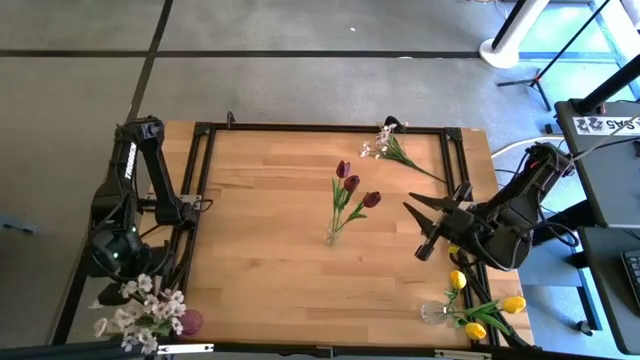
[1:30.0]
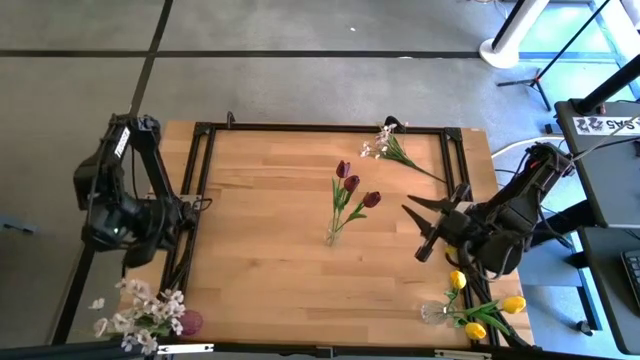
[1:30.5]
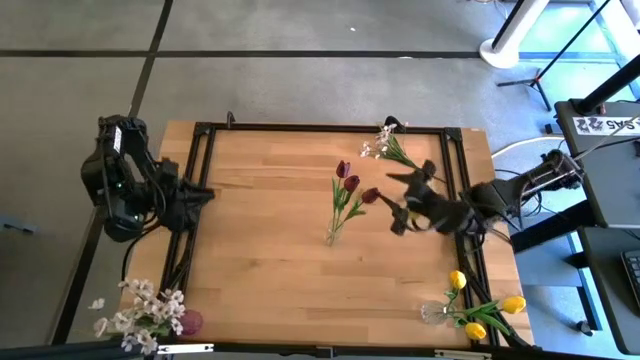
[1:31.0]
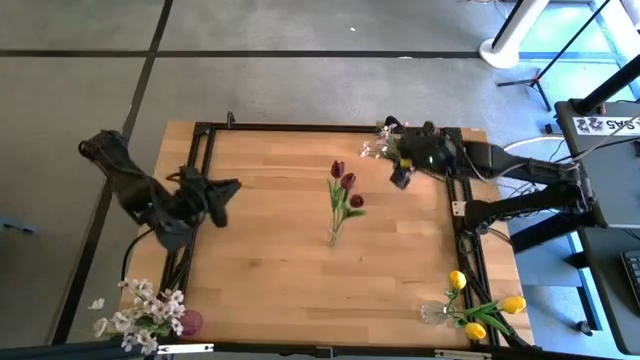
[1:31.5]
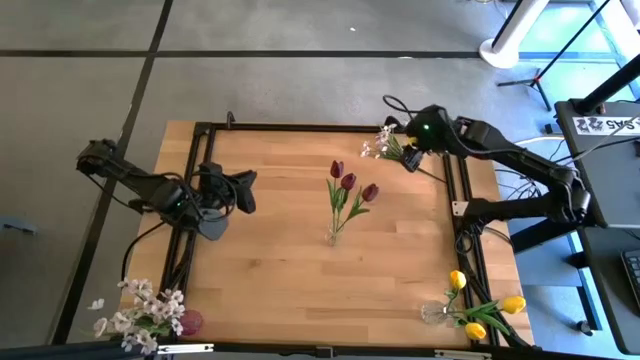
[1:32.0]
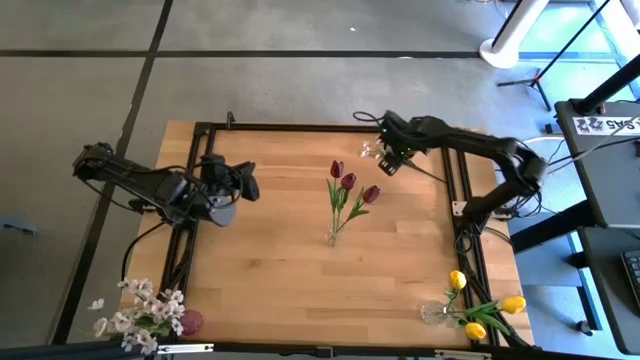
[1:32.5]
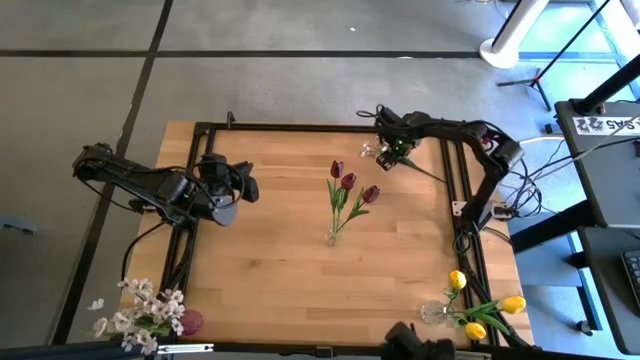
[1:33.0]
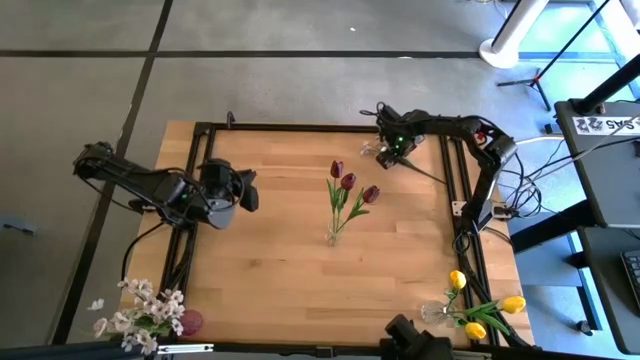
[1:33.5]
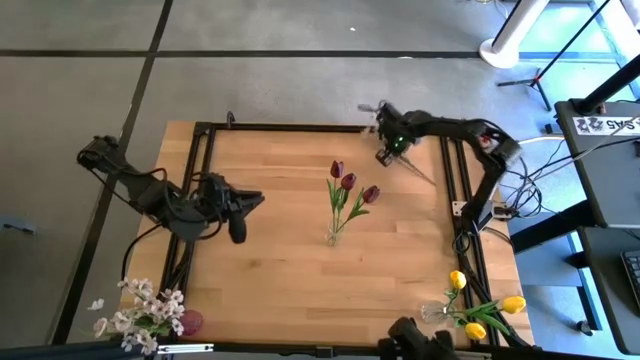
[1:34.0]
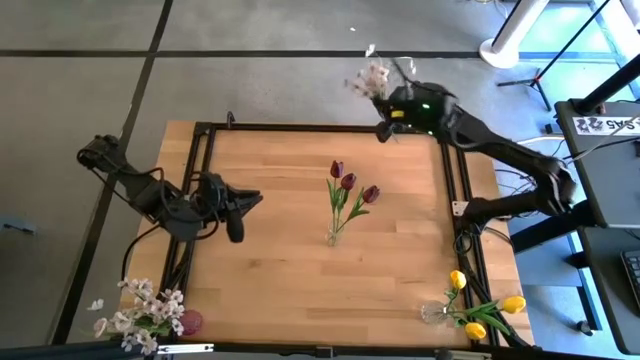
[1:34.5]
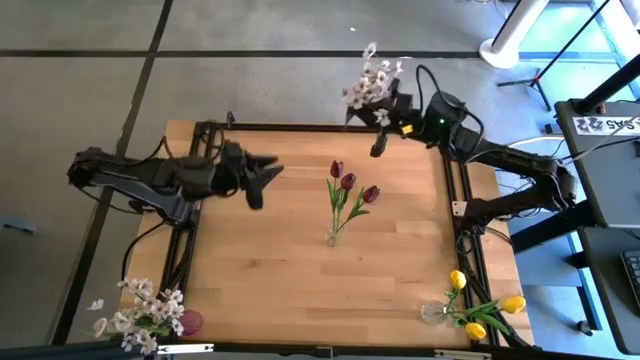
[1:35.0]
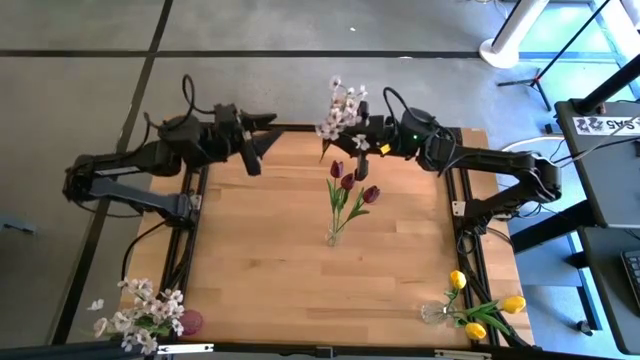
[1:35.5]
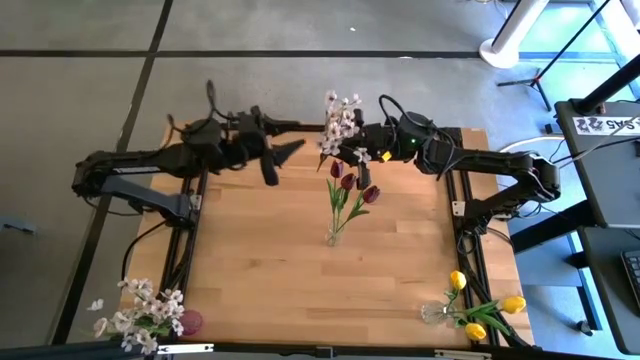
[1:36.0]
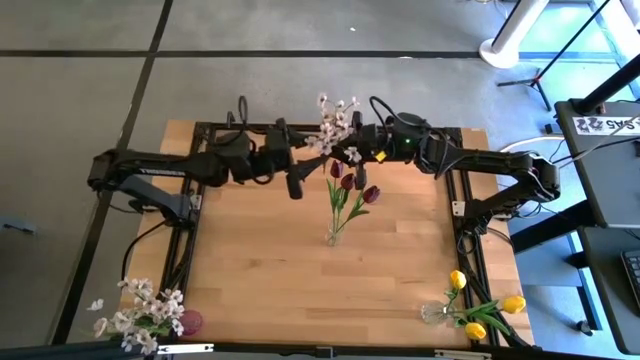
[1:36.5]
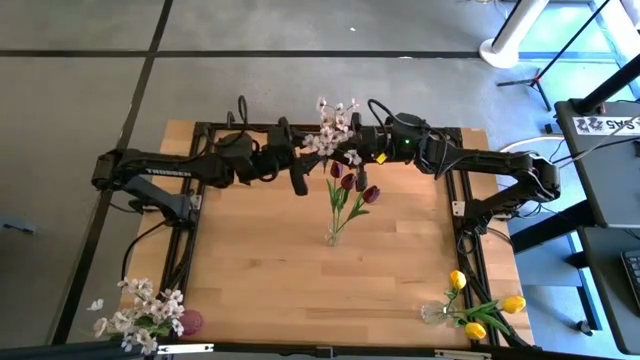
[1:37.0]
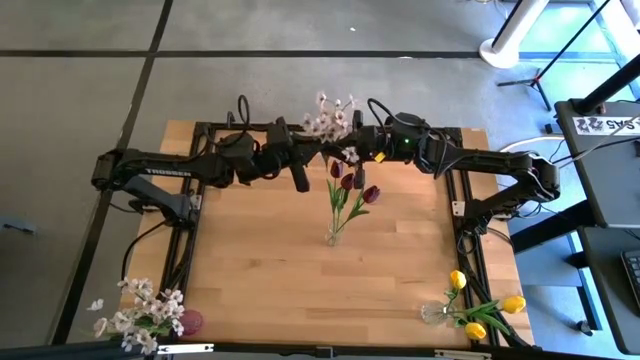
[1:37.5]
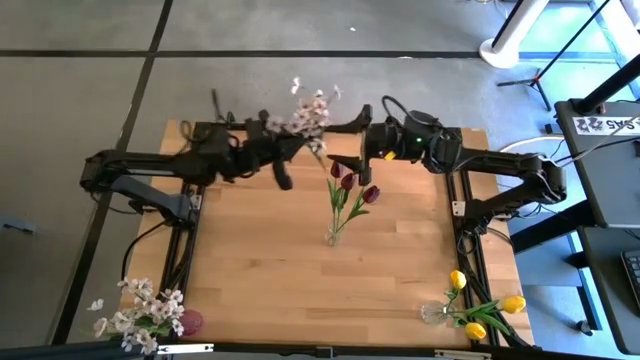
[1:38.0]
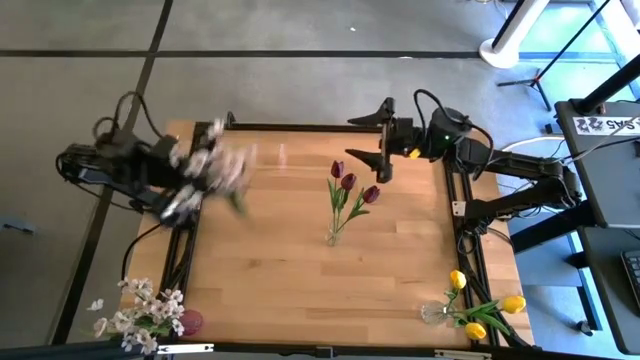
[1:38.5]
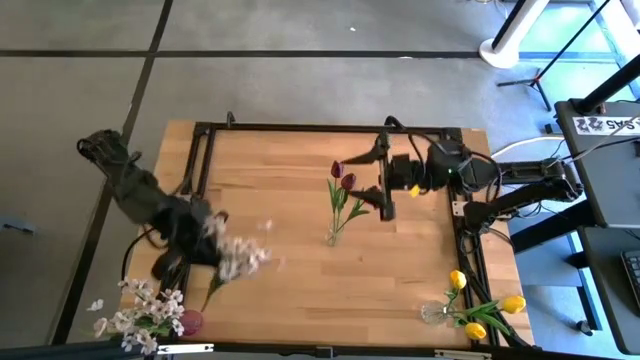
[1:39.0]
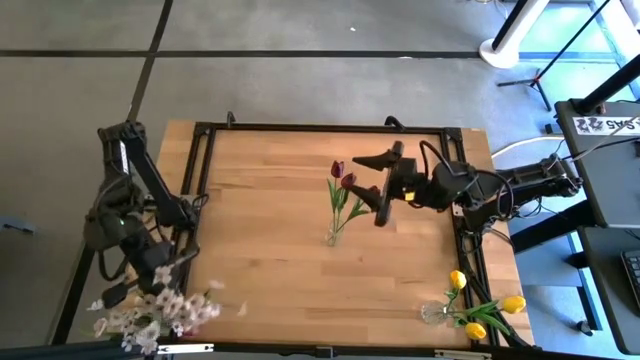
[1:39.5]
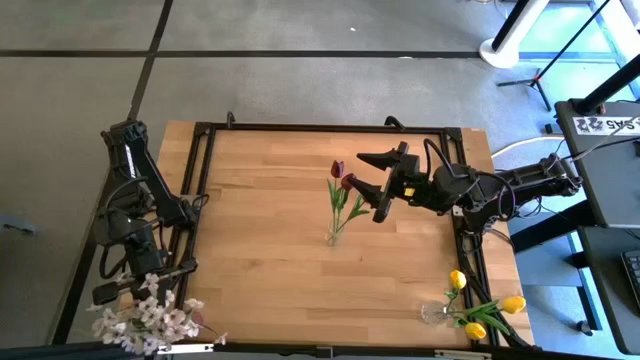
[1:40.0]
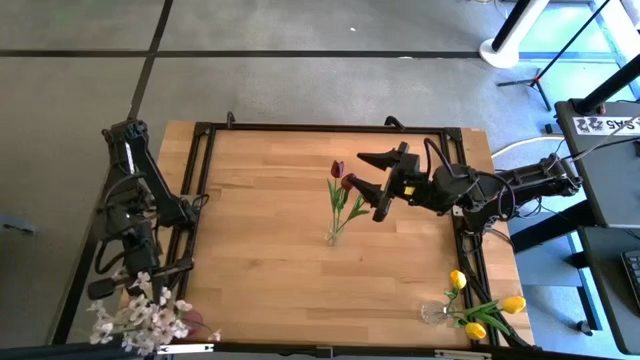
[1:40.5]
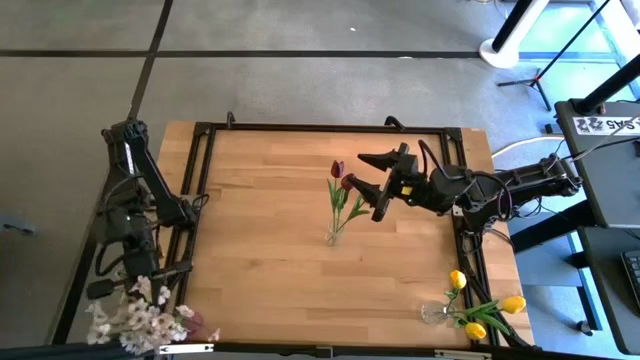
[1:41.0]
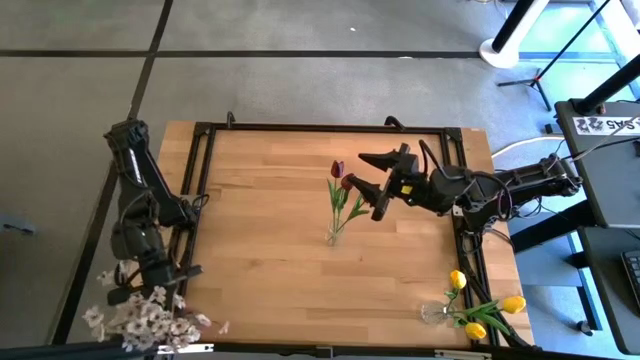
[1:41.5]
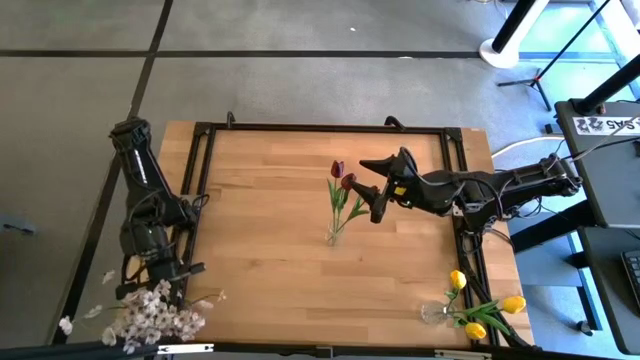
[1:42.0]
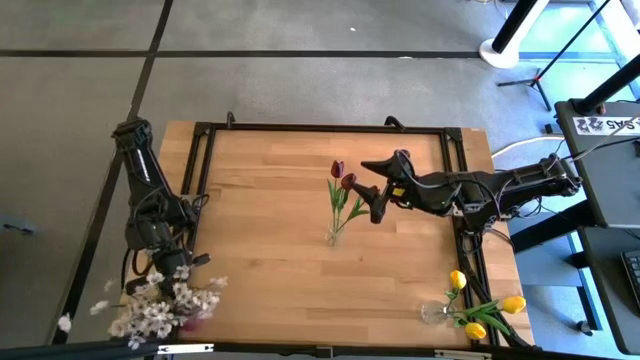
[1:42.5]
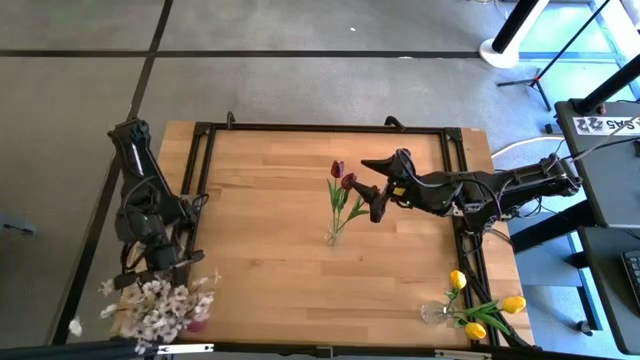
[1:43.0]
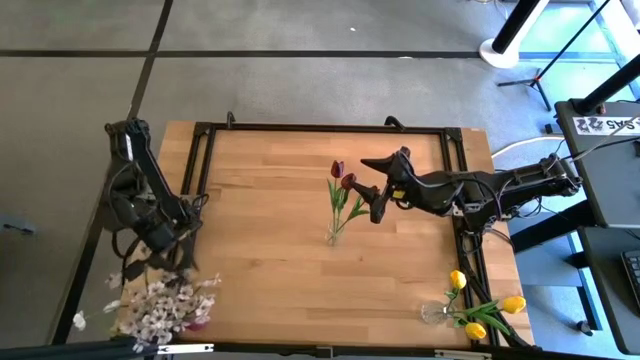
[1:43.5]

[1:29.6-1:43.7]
Task: Sort flowers into vase by color
Put the white flowers into the purple vase

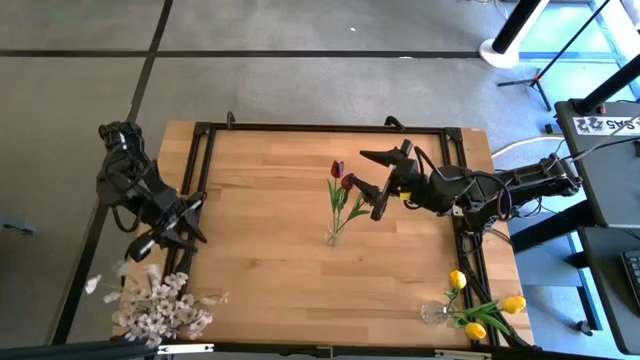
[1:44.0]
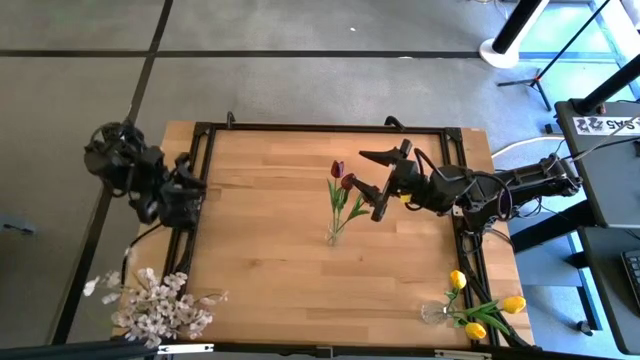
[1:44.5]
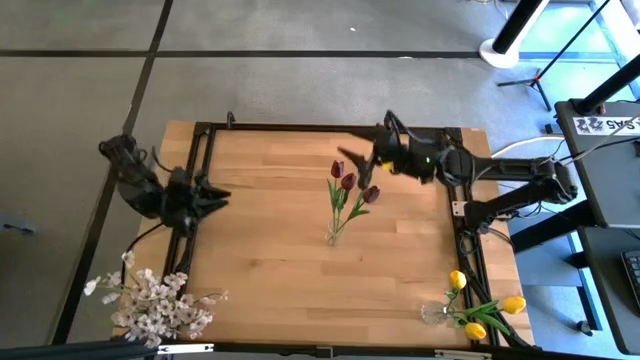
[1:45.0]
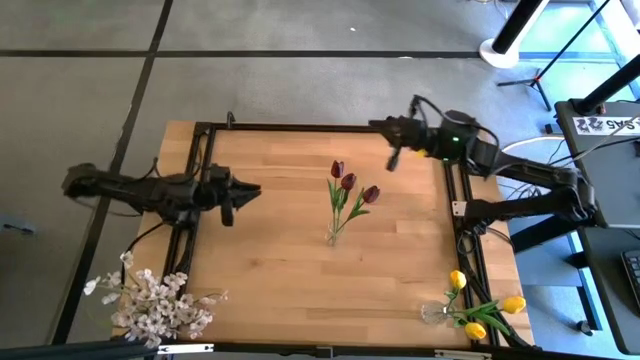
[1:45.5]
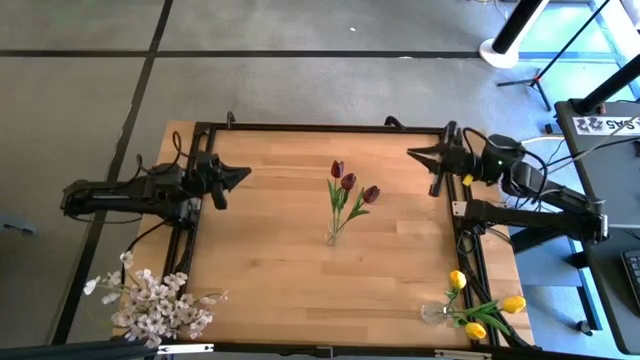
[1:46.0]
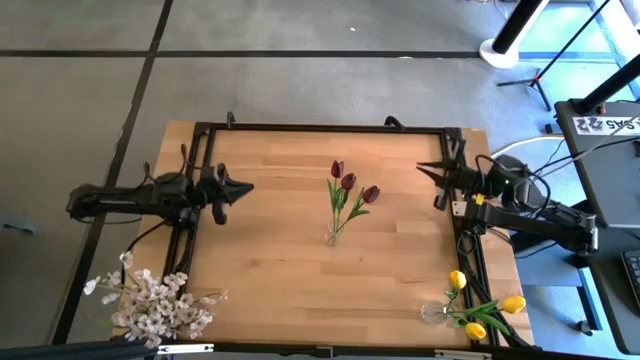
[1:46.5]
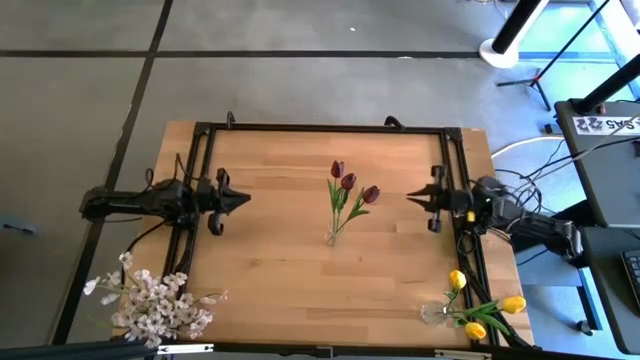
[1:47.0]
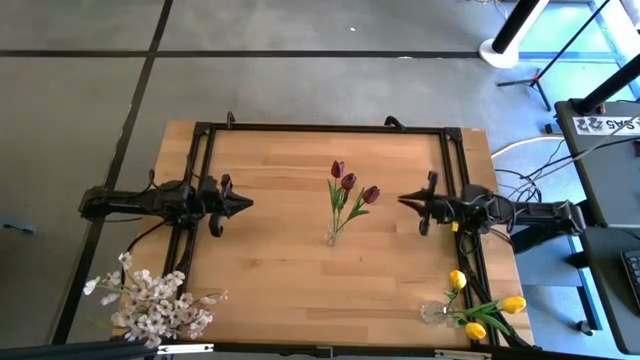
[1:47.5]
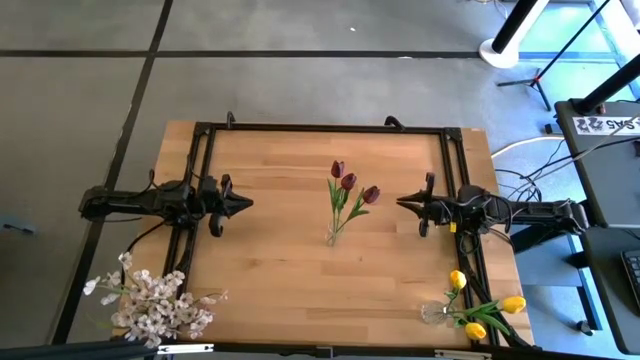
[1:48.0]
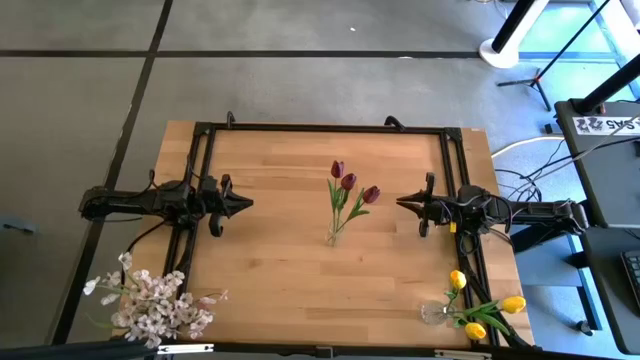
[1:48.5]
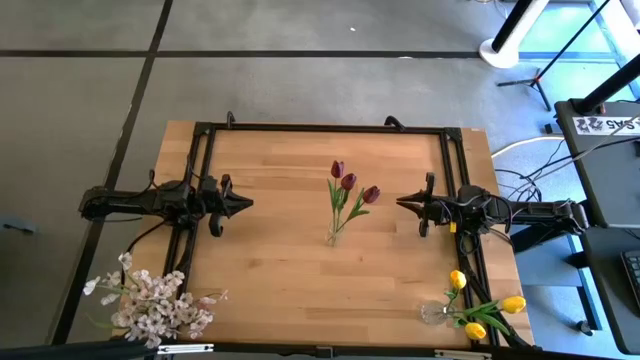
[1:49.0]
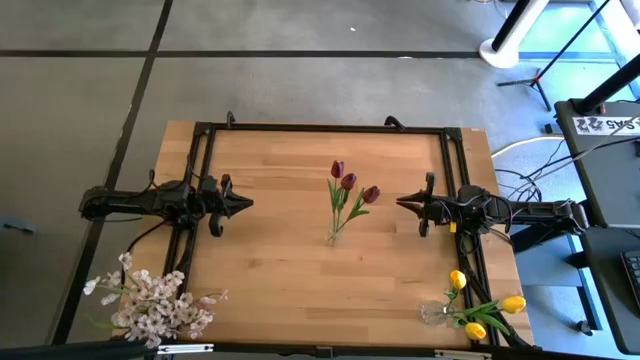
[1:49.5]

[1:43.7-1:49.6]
Return to Home Position

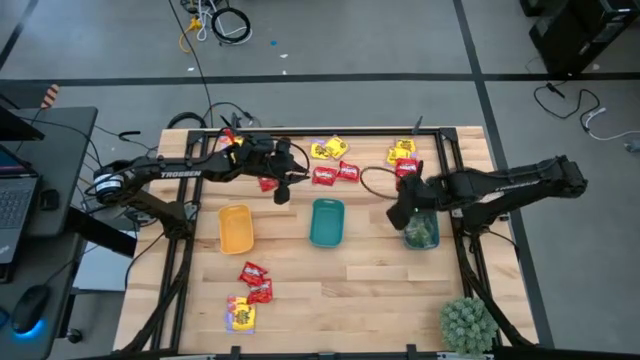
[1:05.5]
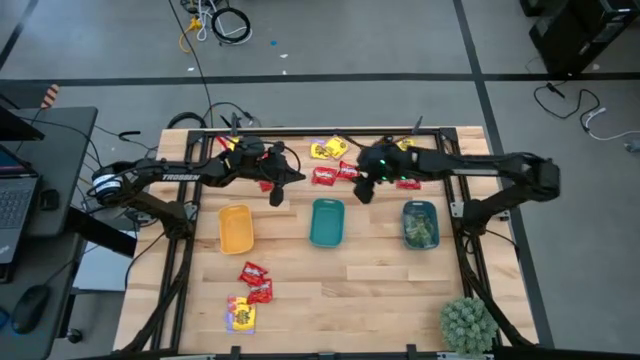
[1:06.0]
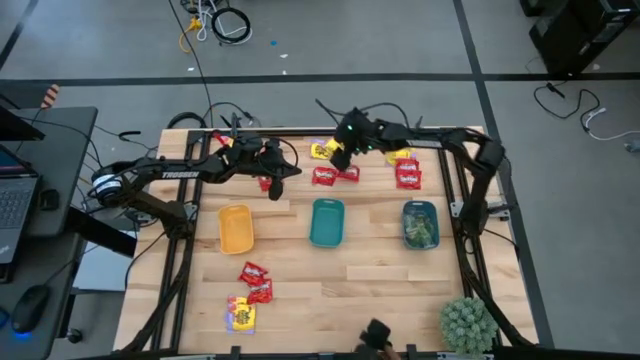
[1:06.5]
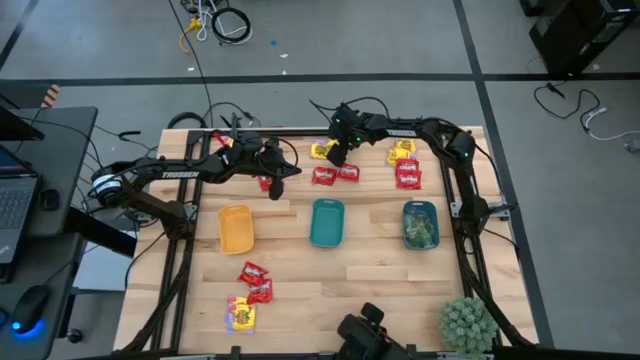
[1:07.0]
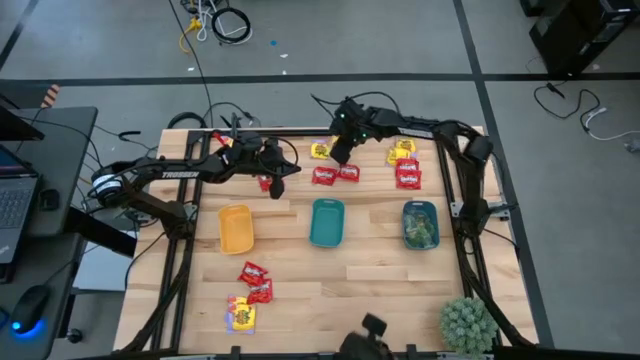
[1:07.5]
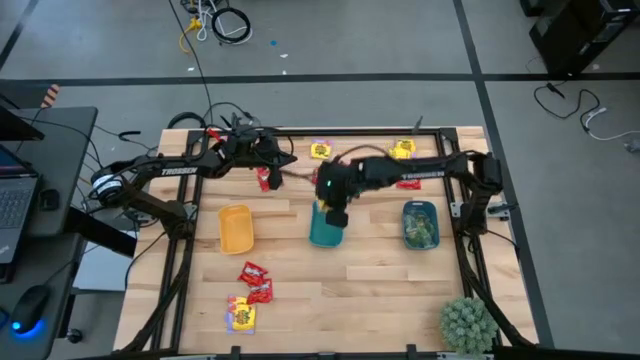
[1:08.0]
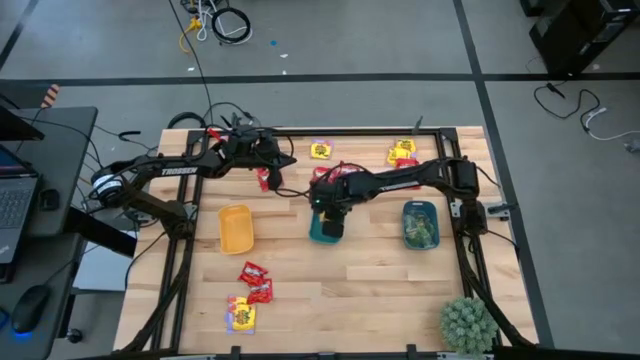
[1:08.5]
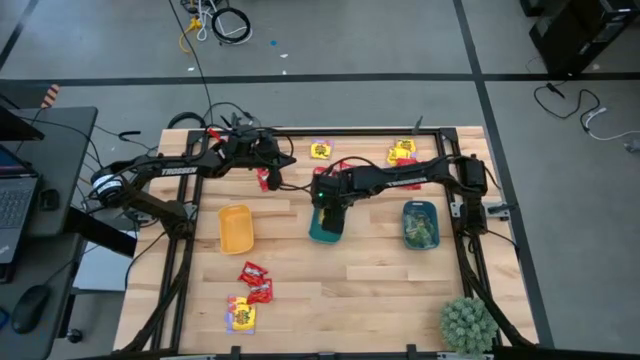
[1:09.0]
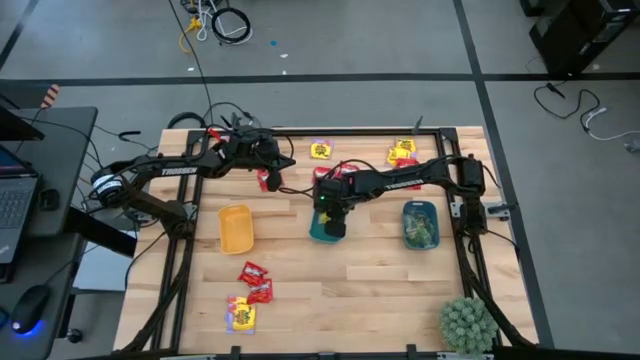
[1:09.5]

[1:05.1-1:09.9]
Task: Sort candy
Put the yellow candy pack into the green bin
